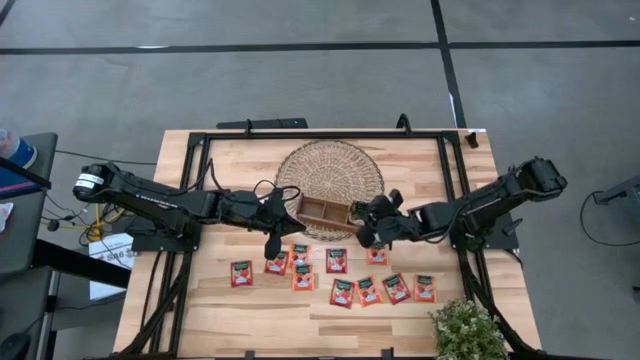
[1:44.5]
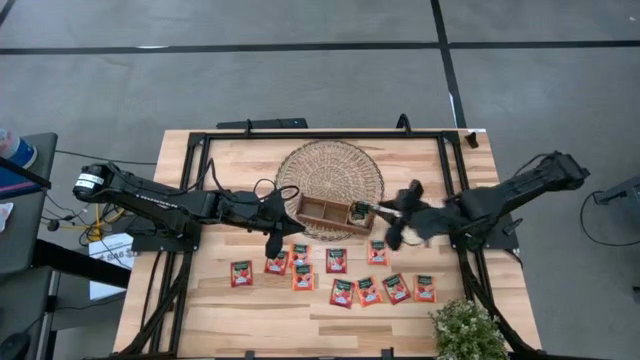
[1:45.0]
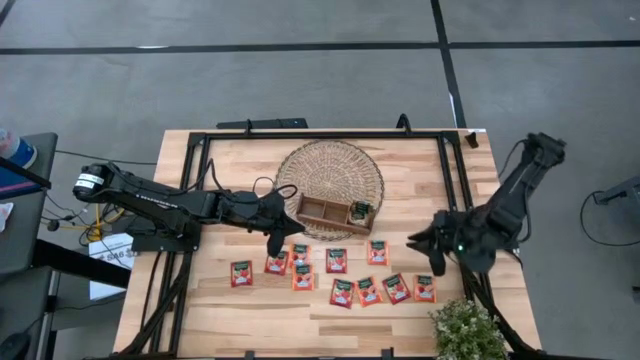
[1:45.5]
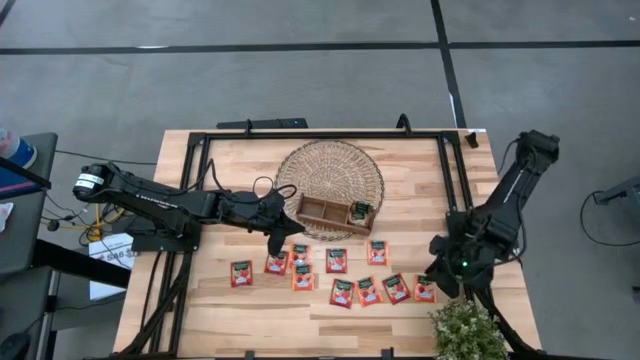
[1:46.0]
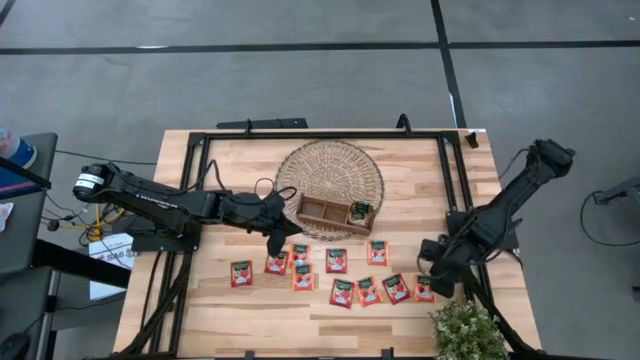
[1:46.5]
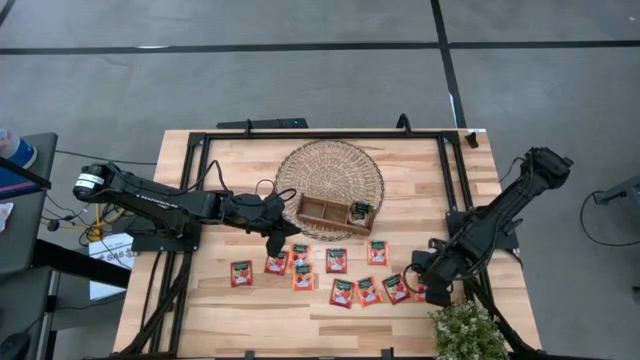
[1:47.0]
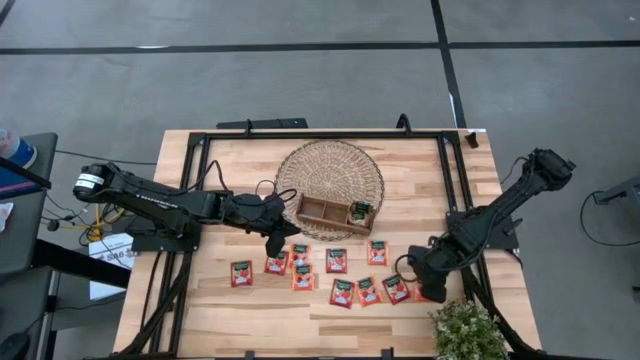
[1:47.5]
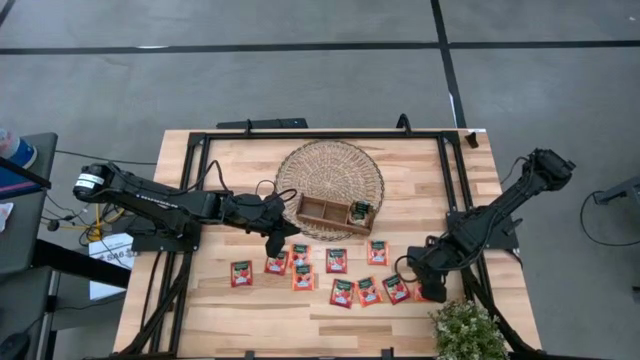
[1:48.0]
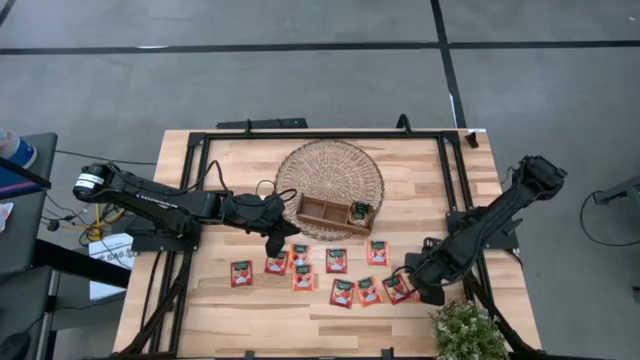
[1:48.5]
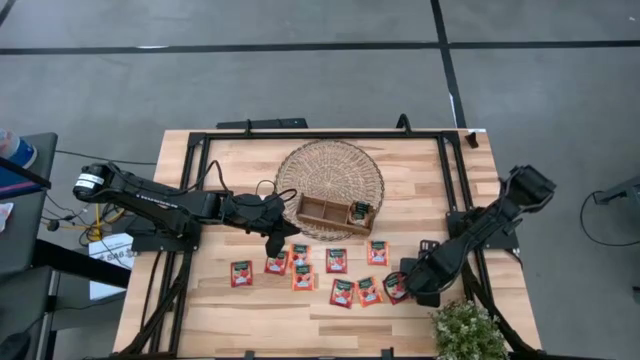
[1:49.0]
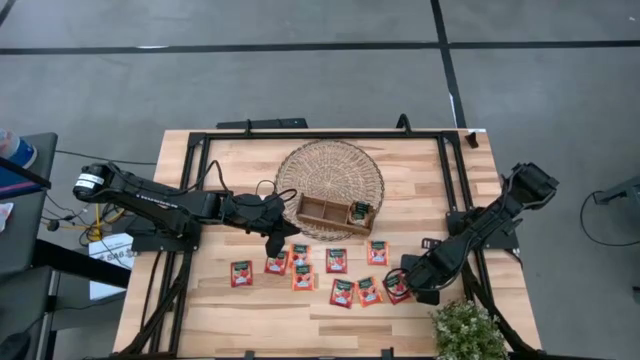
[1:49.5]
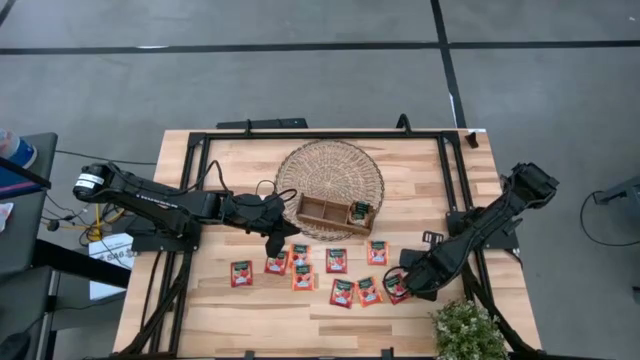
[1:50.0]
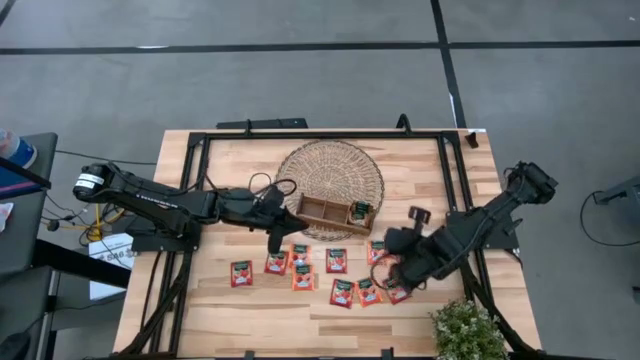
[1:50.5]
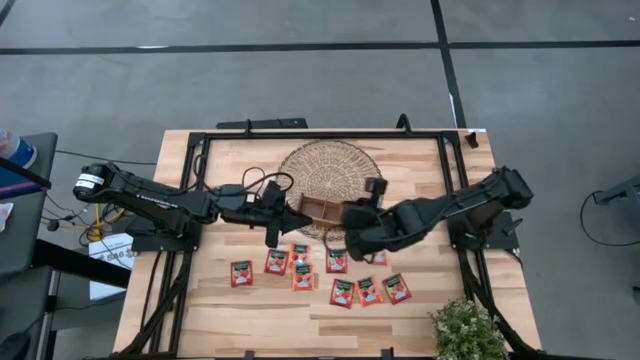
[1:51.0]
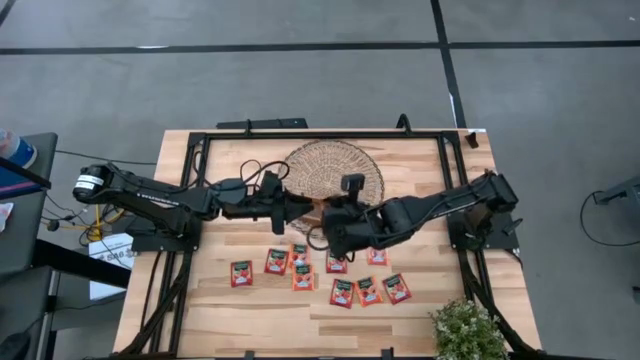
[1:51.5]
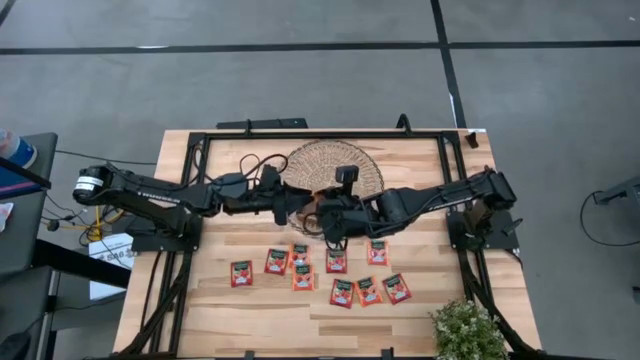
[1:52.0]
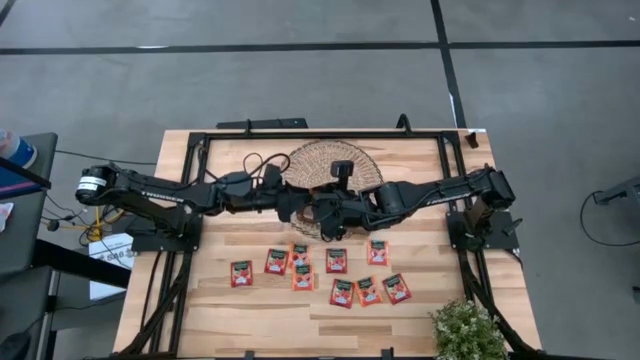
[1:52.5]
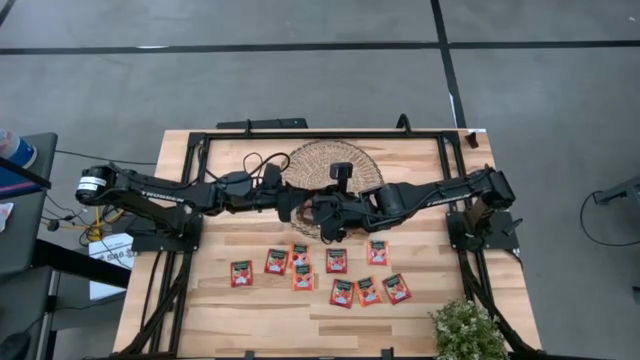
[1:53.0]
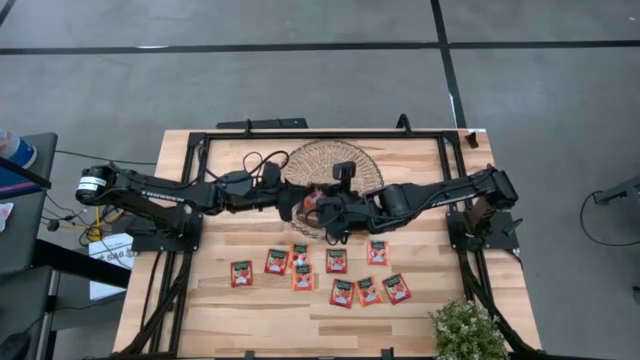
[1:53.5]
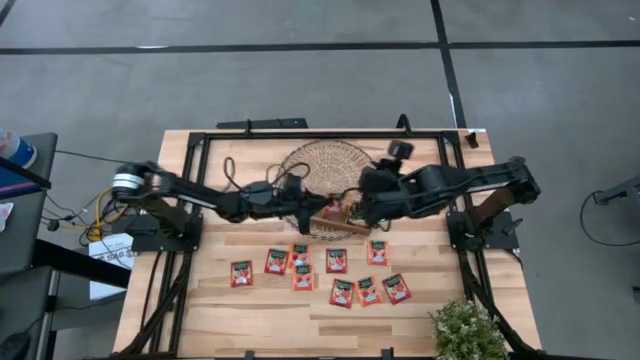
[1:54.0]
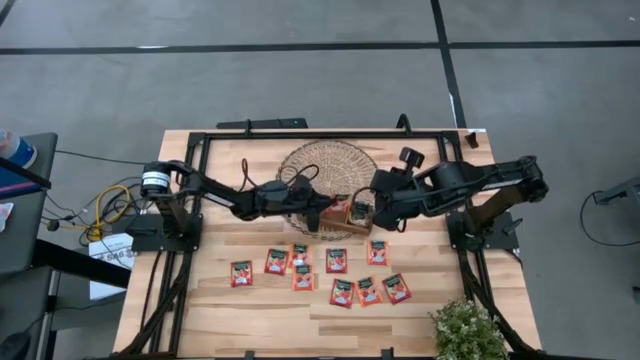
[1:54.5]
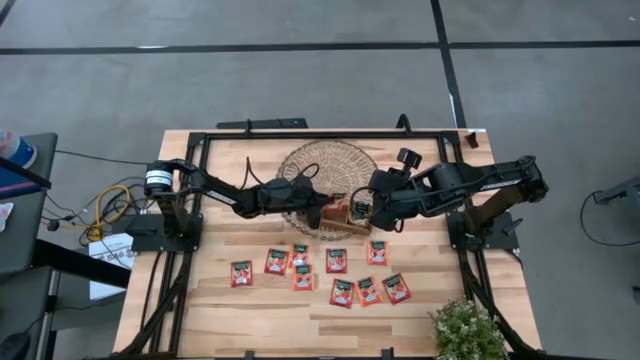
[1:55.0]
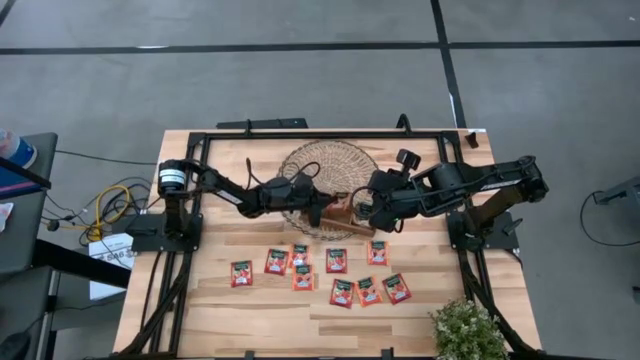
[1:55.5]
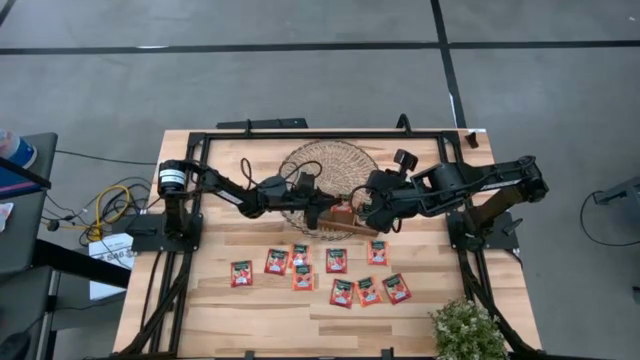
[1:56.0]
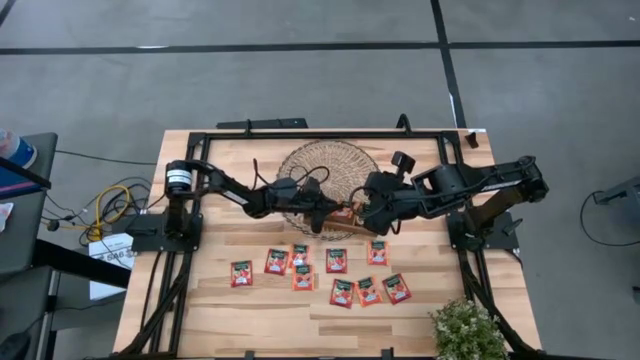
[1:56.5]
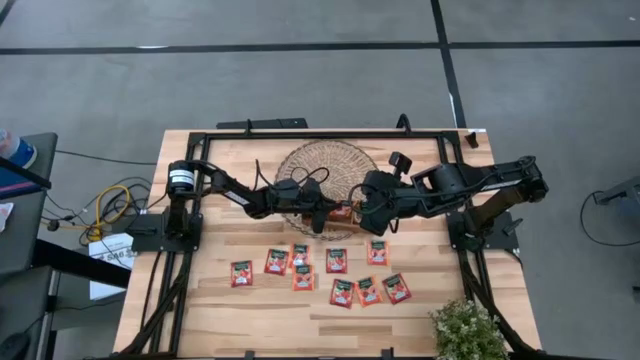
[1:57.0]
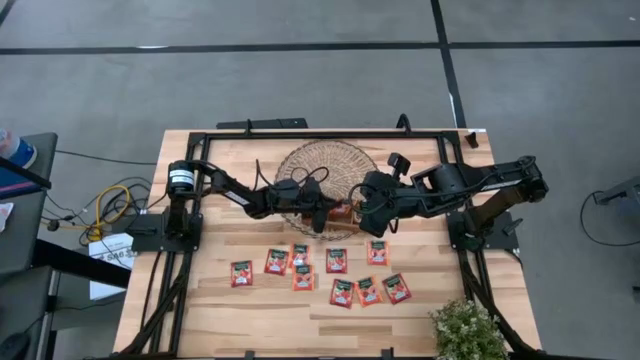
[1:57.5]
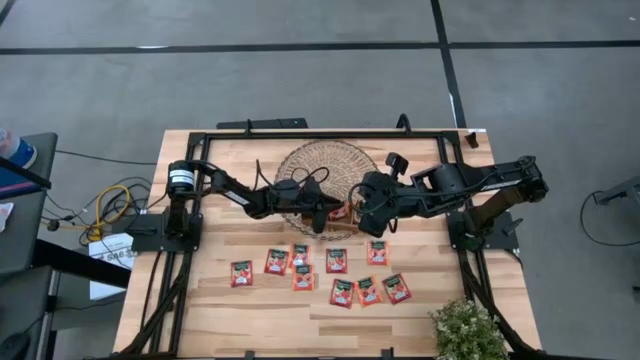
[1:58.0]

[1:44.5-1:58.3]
Task: Pick & Place Tea
Put the orange tea bag into the middle section of the wooden organizer

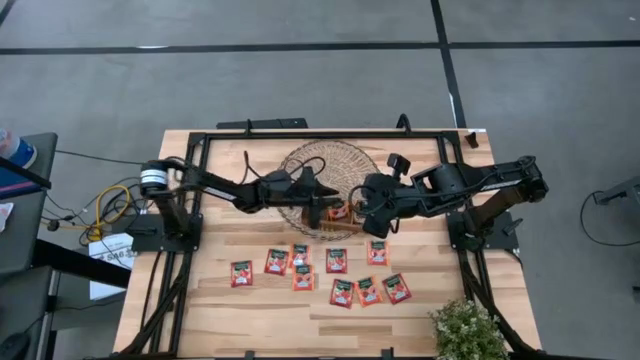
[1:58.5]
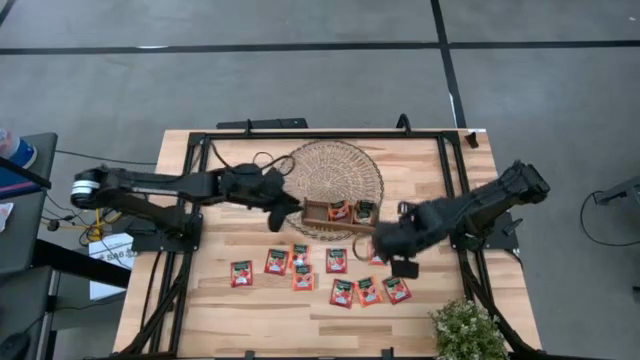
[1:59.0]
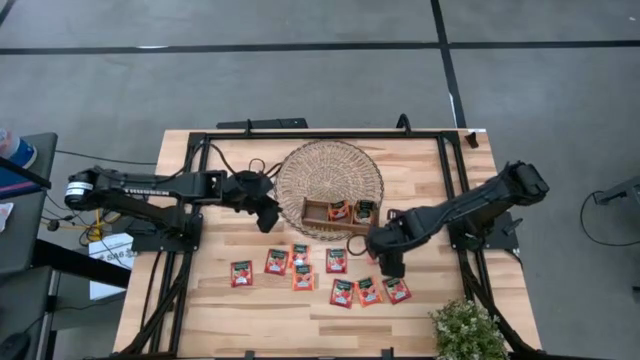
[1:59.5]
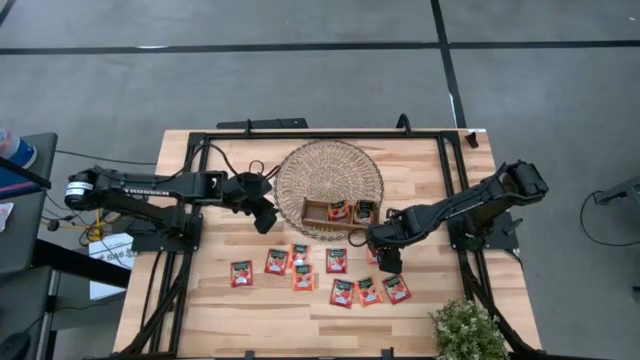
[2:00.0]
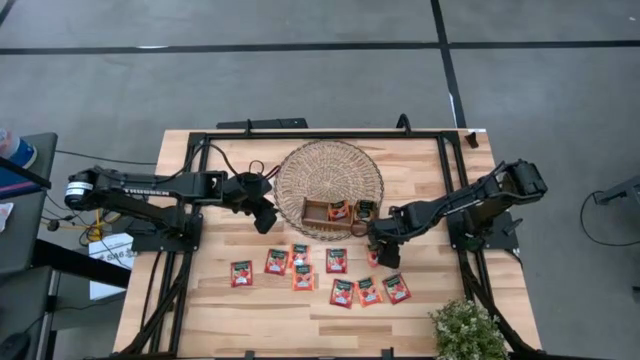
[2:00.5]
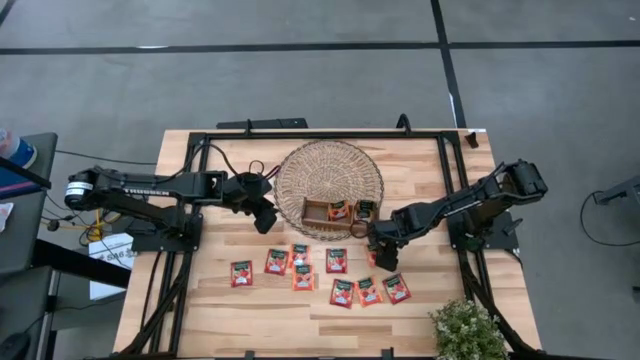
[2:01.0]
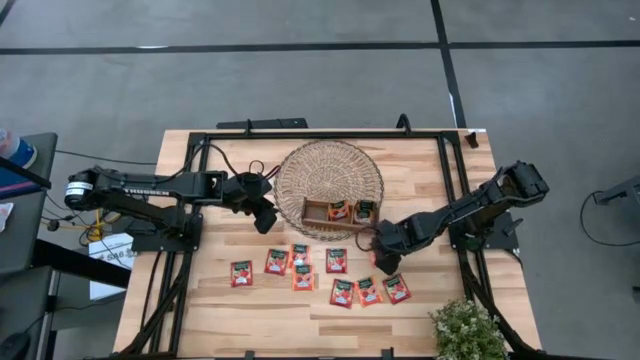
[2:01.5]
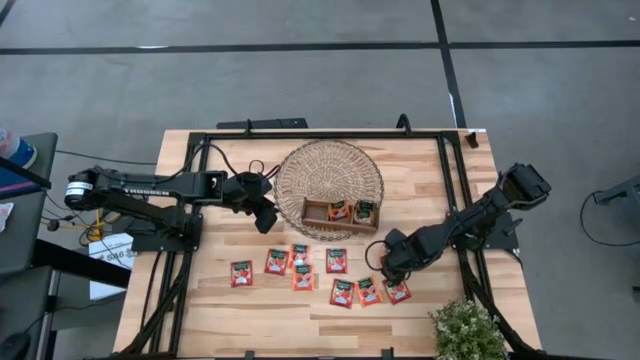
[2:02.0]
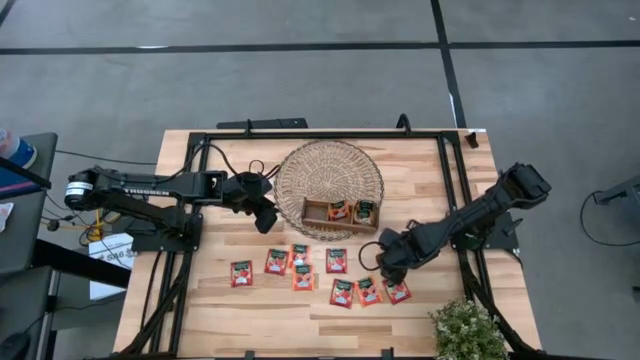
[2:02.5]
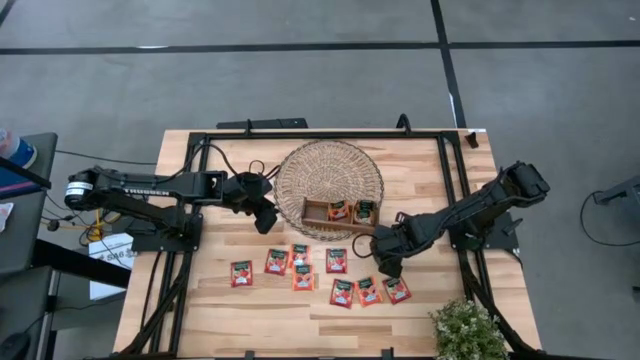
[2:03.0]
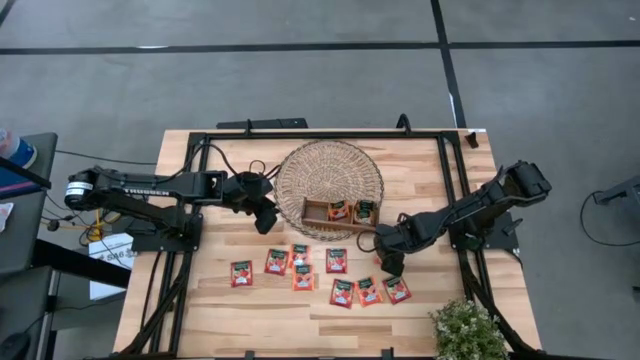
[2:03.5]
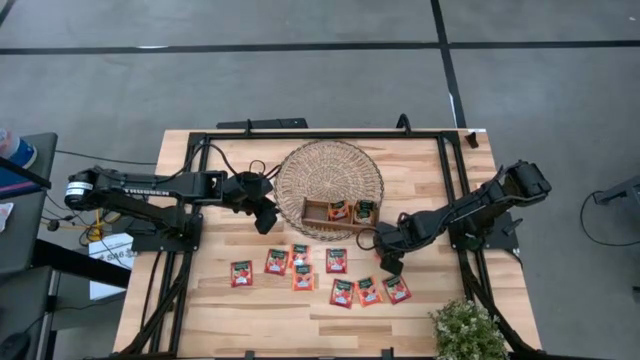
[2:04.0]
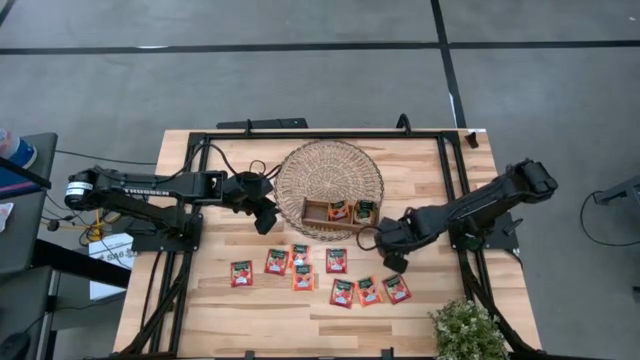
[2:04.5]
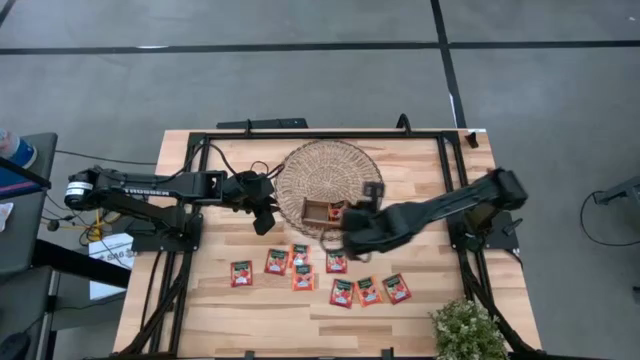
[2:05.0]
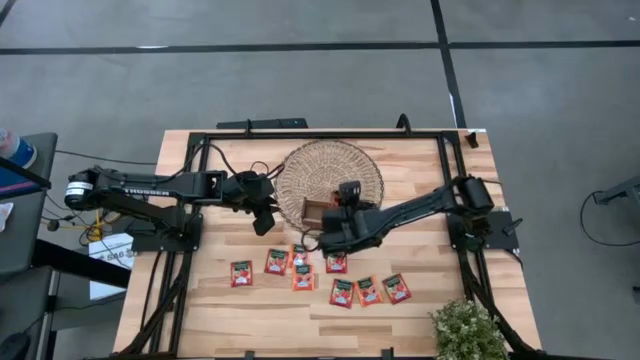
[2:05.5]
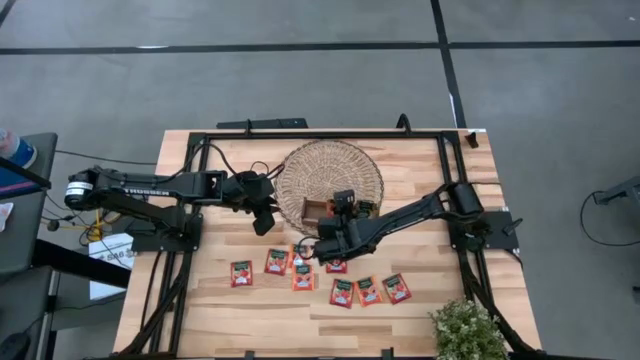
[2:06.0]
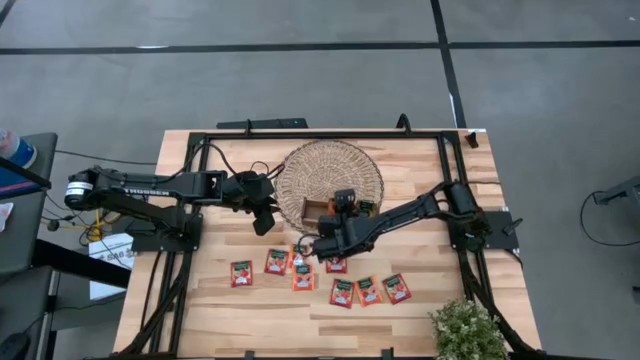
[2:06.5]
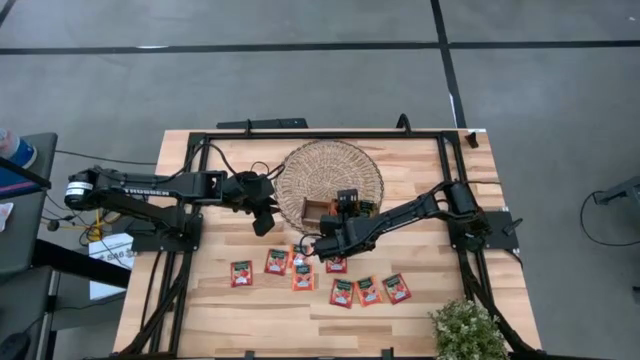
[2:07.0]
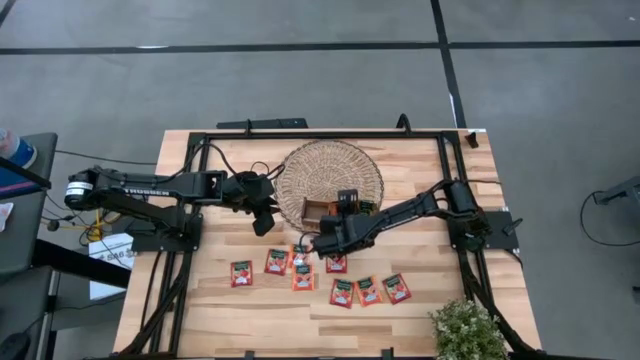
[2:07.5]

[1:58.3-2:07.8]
Put the orange tea bag into the middle section of the wooden organizer
